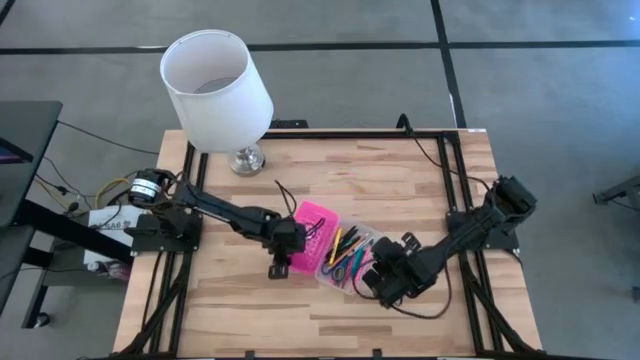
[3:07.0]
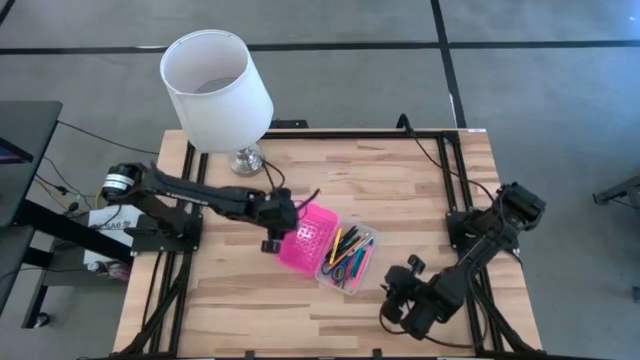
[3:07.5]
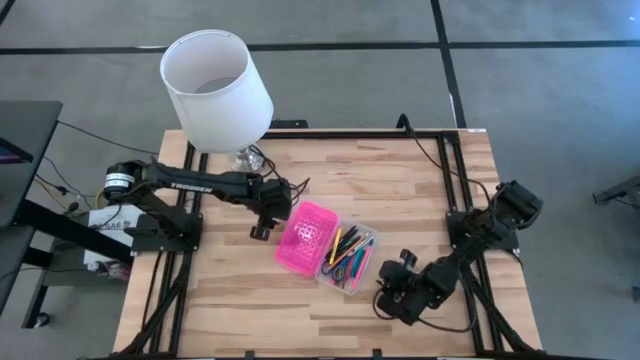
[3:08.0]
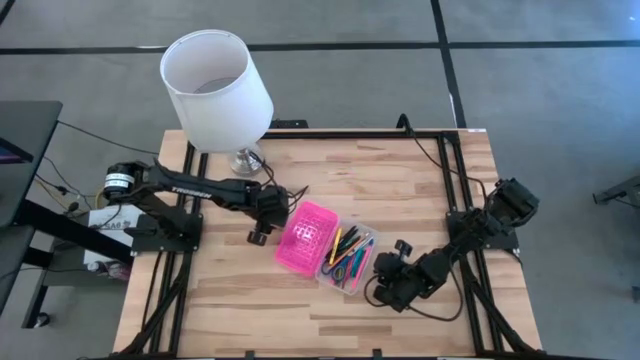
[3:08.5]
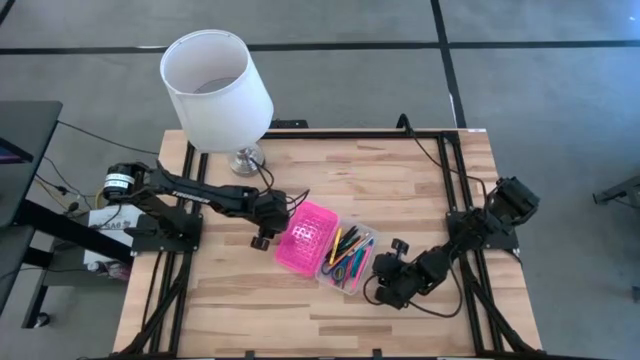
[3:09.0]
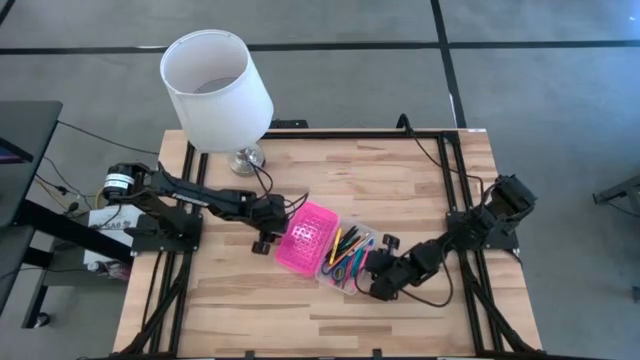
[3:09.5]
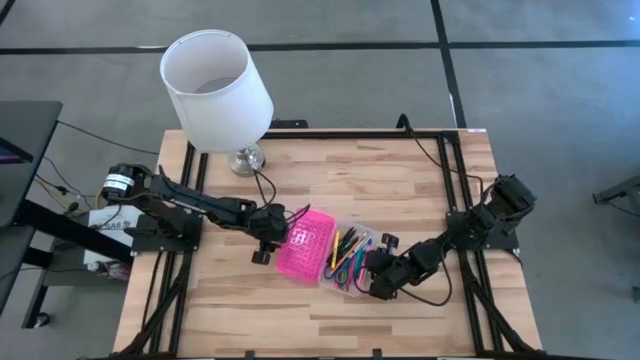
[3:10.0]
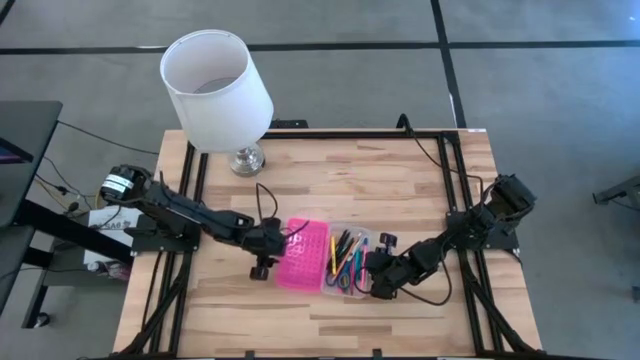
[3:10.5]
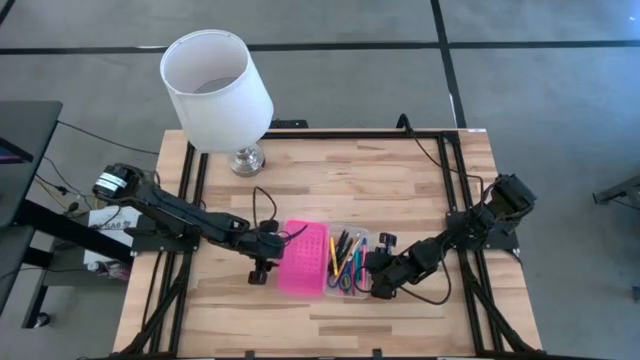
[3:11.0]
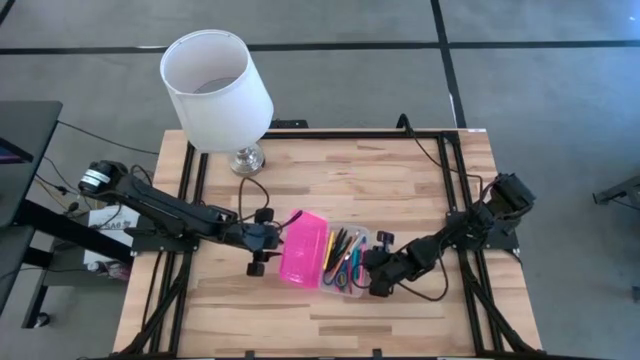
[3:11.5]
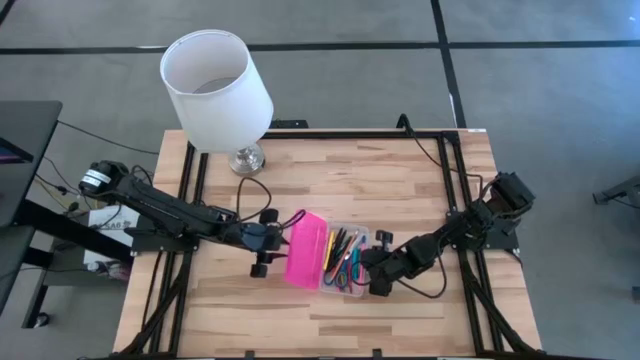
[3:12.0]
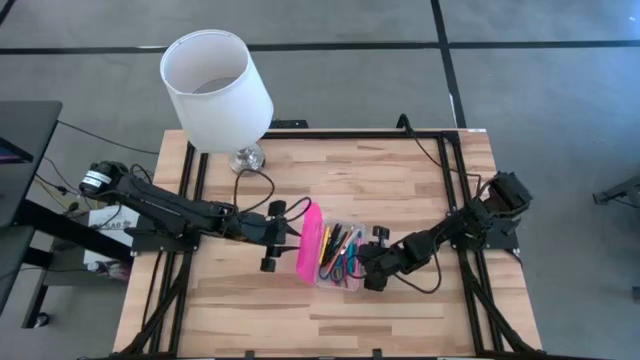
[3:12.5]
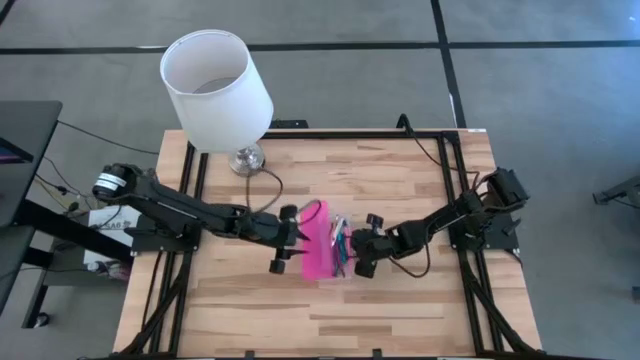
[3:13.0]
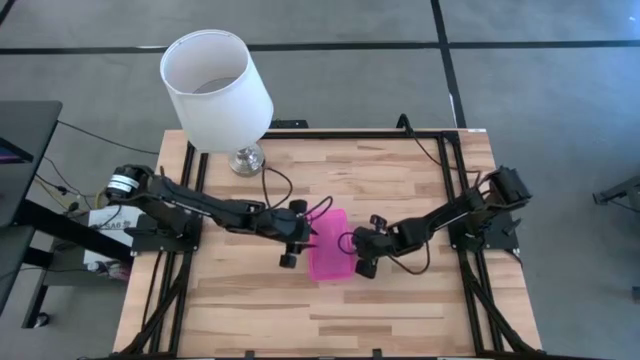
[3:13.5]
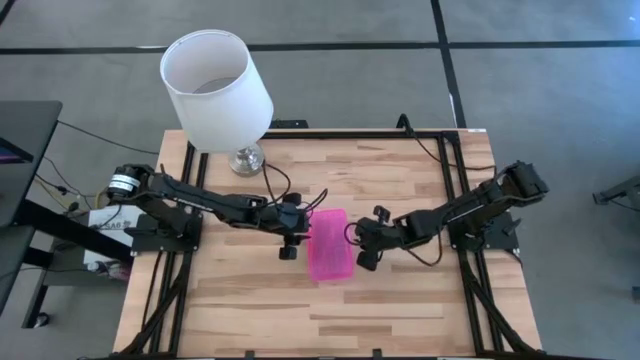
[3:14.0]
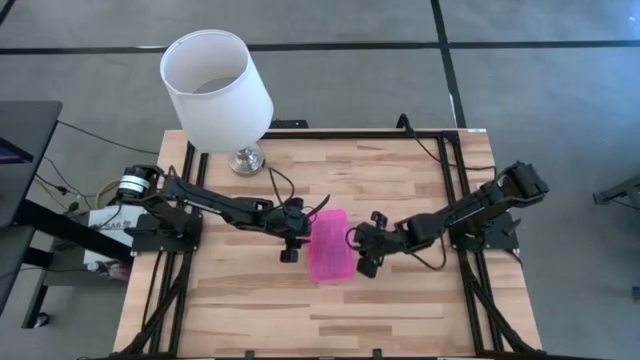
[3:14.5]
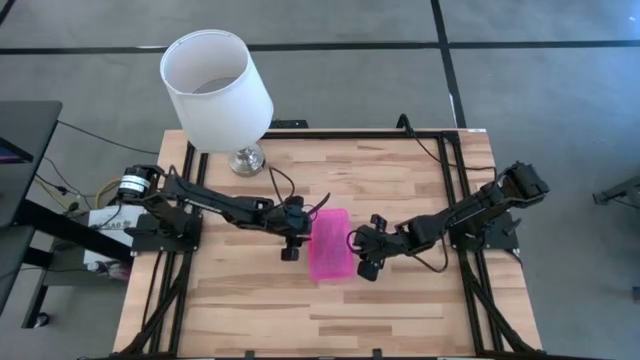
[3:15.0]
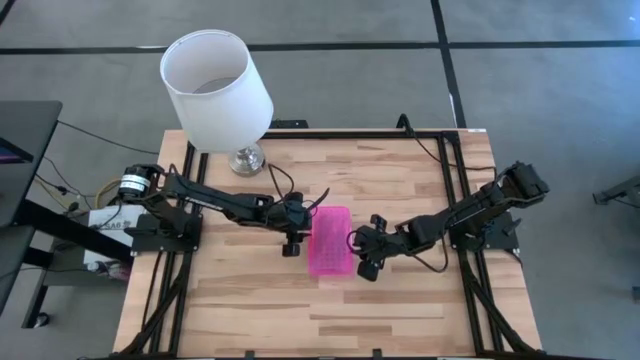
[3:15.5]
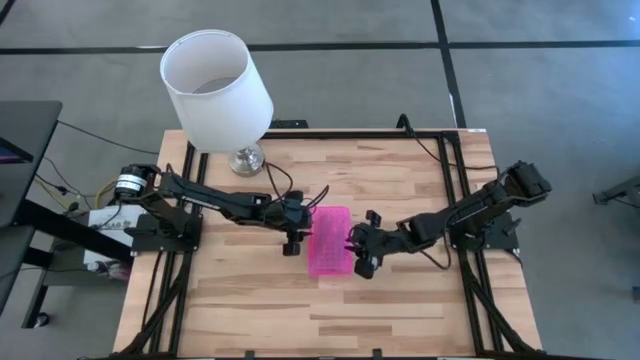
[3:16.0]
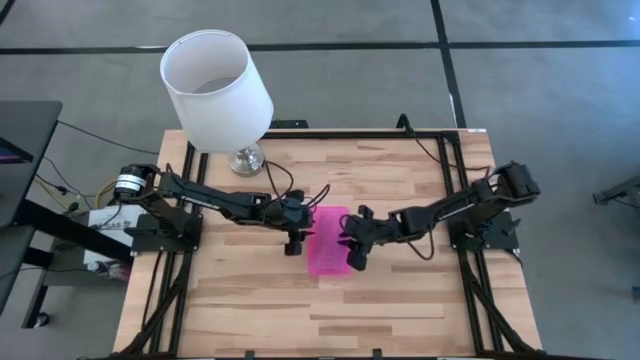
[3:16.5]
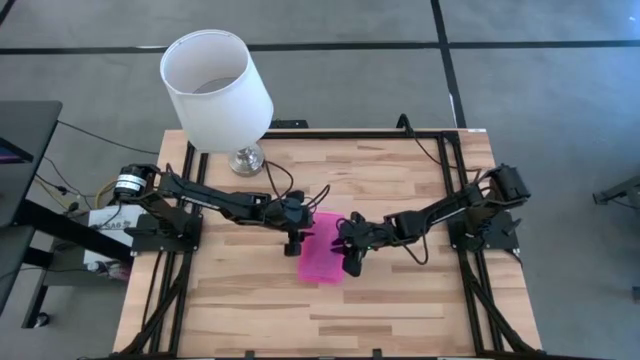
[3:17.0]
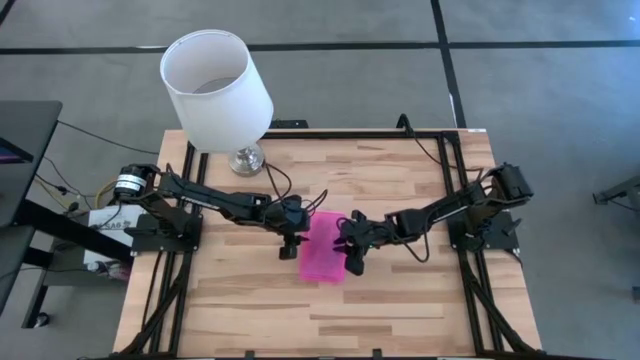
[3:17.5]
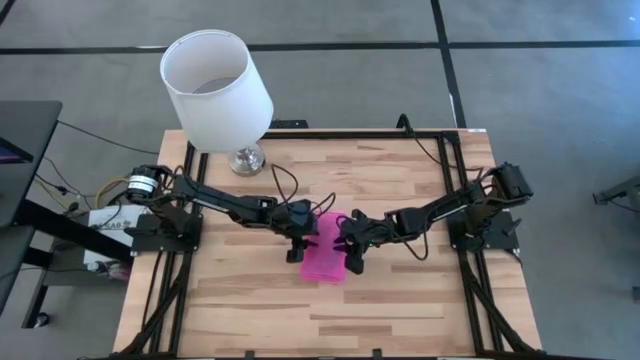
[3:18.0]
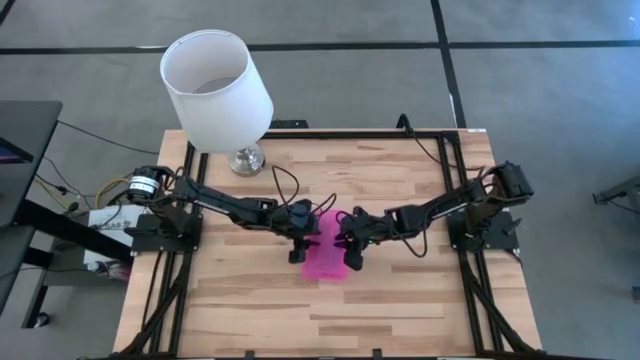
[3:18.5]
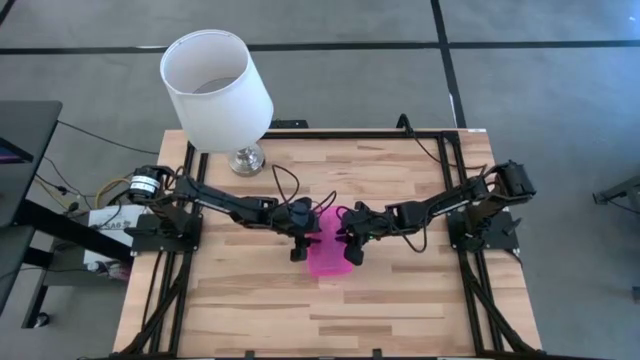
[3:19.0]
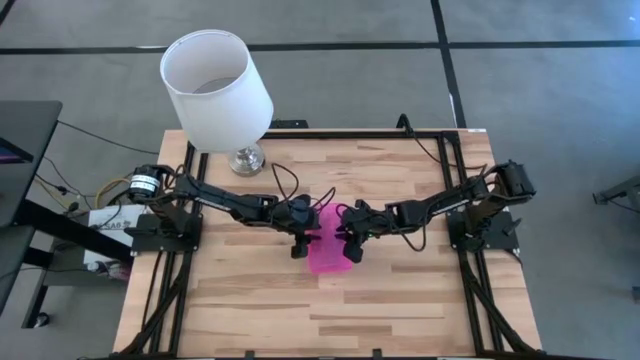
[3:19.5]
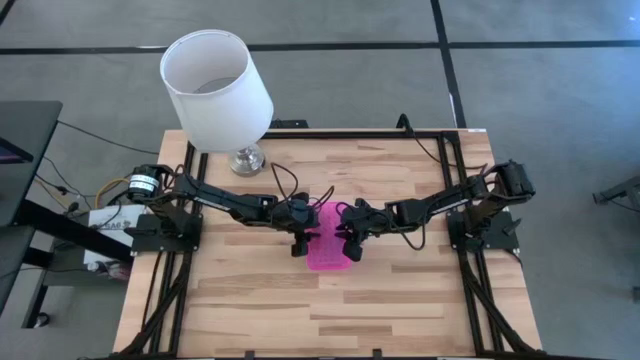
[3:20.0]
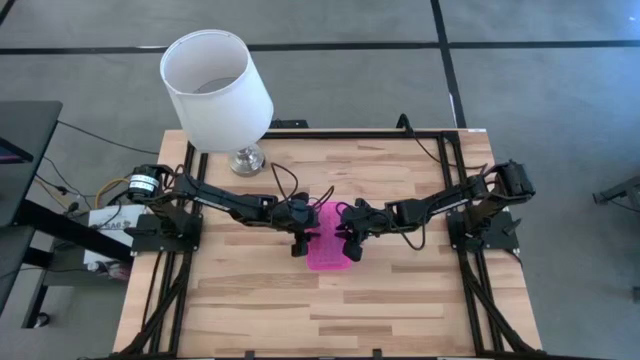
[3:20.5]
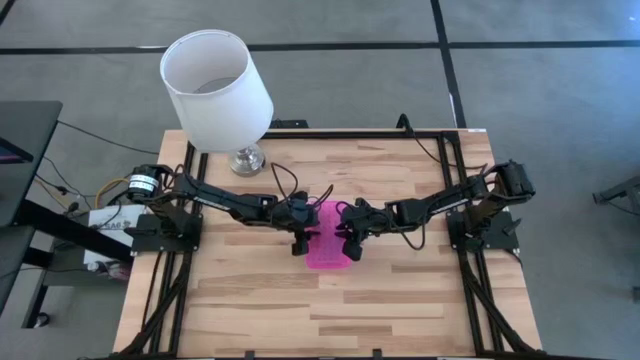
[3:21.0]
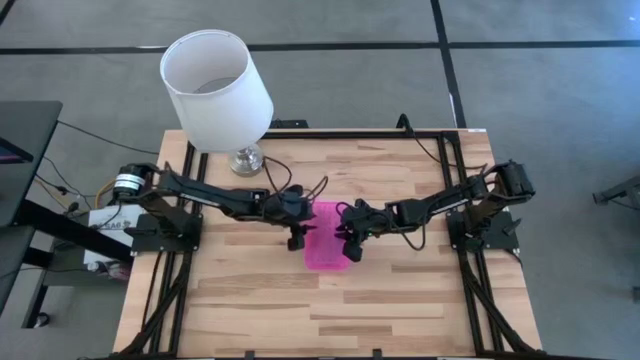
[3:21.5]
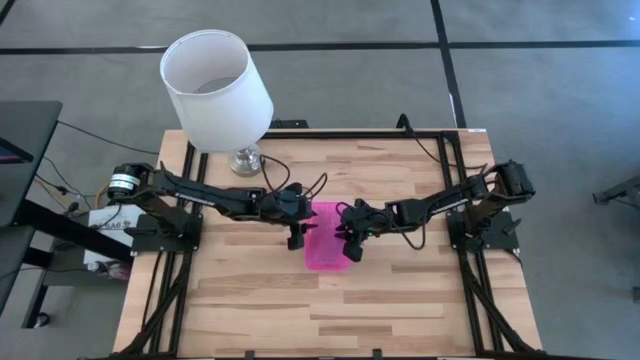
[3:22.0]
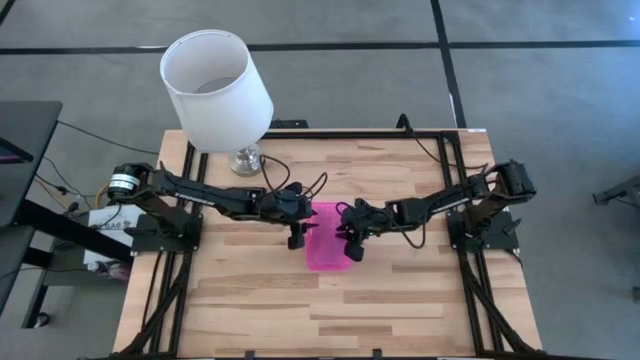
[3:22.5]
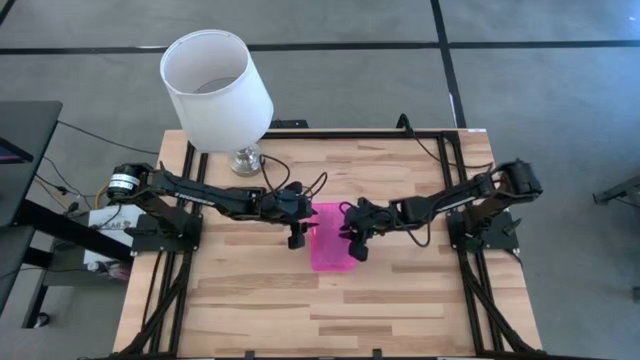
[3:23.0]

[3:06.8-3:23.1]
Task: Pick & place school supplies into a supply box
Close the pink supply box

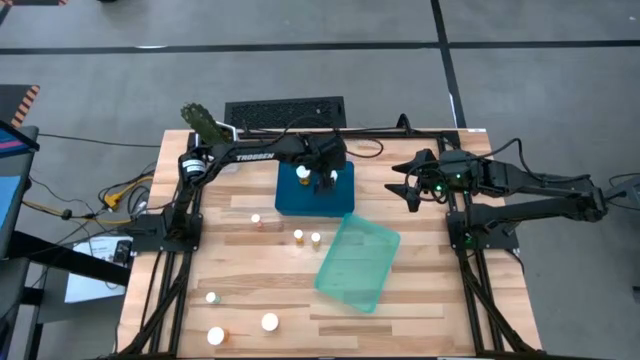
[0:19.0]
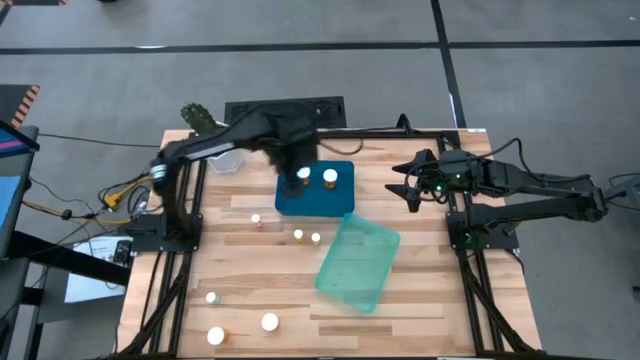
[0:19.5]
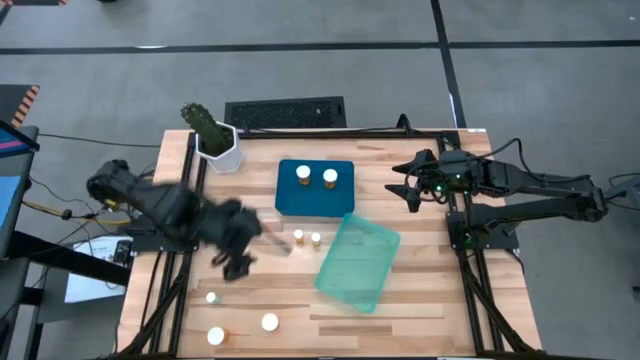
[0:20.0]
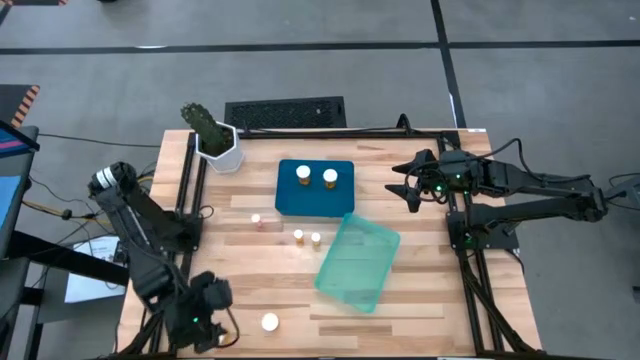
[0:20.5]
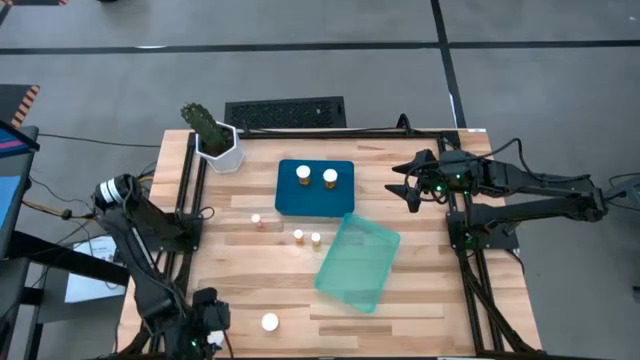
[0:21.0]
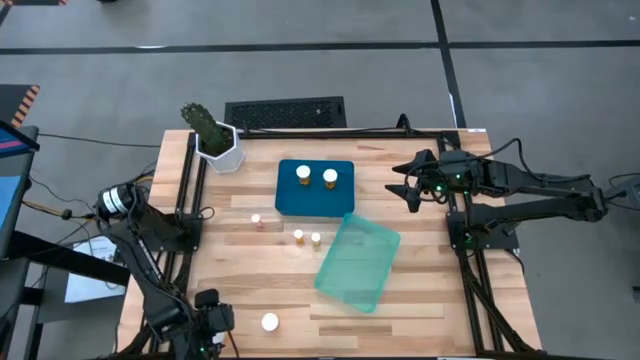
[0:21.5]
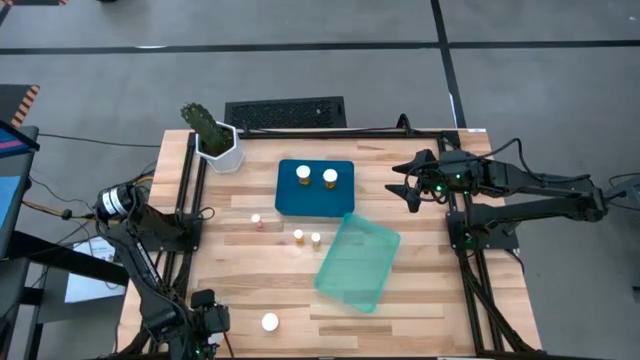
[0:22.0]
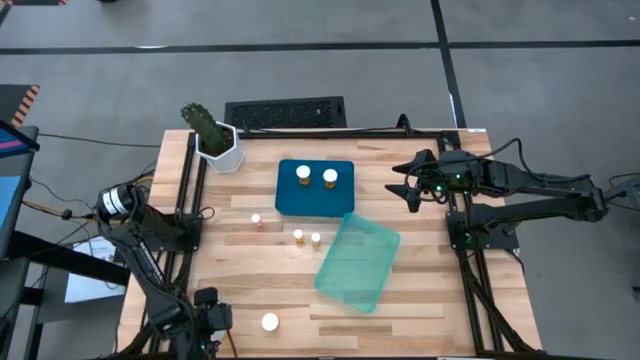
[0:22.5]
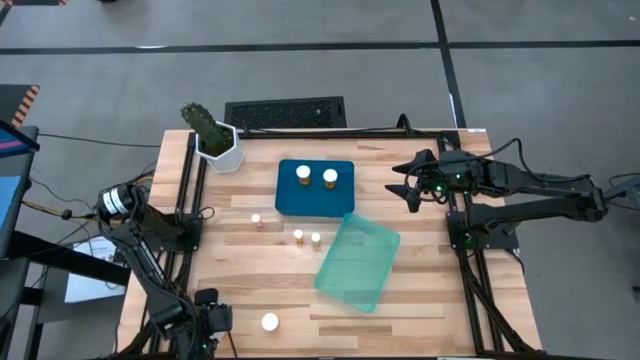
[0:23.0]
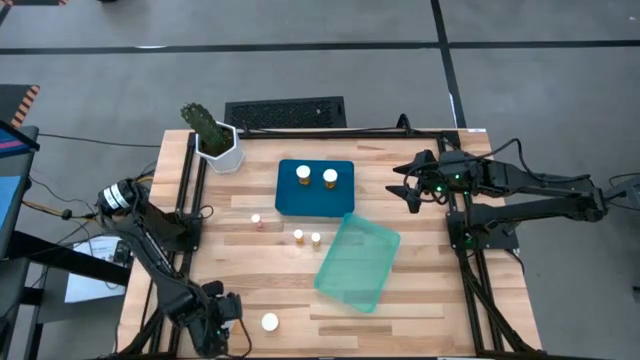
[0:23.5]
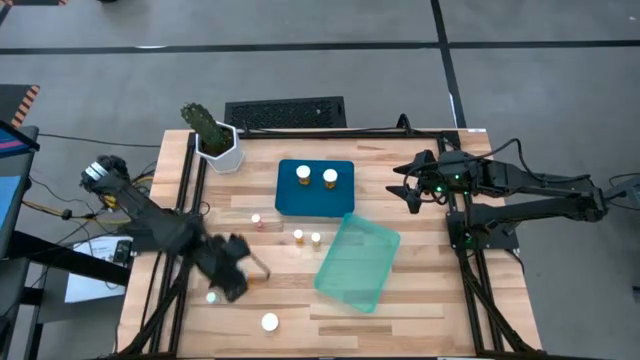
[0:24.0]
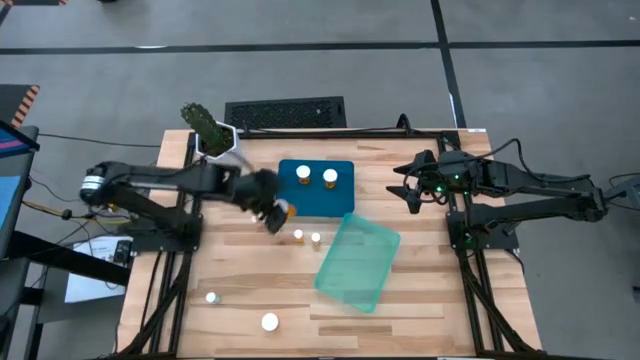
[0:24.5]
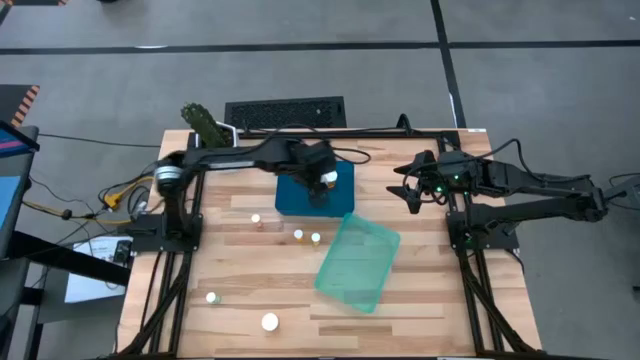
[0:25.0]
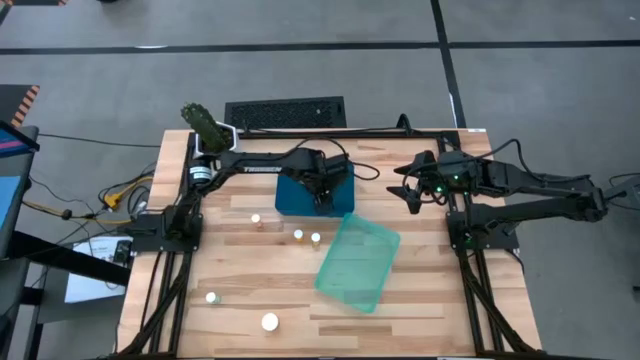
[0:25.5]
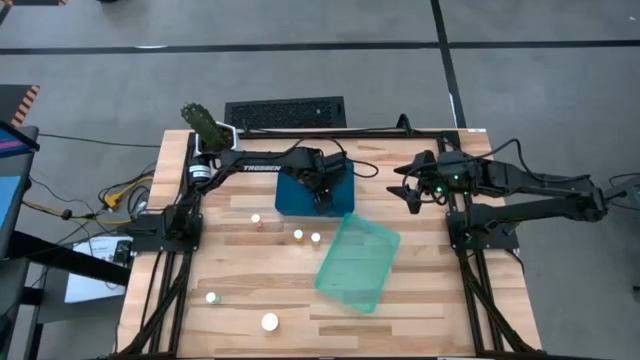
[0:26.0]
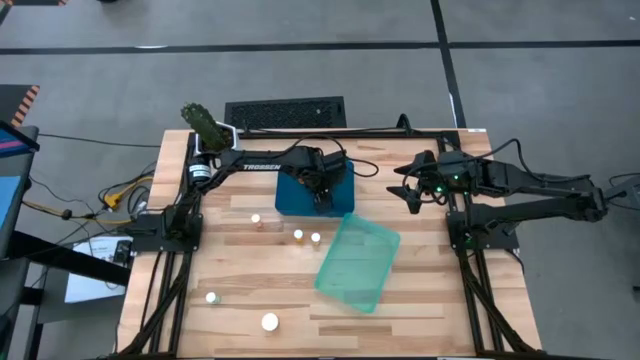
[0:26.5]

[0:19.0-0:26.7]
Task: Pick and place medicine bottles into bin by pill shape (circle, oval)
Put the large orange pill bottle into the blue bin
